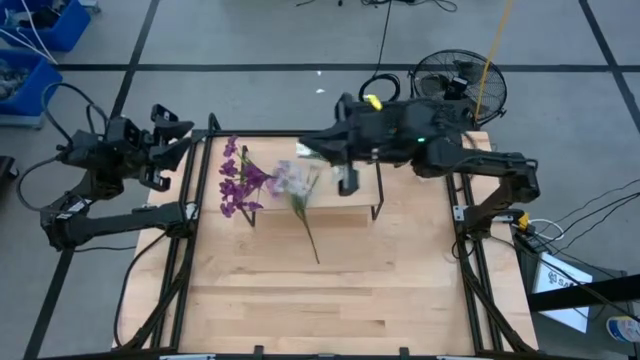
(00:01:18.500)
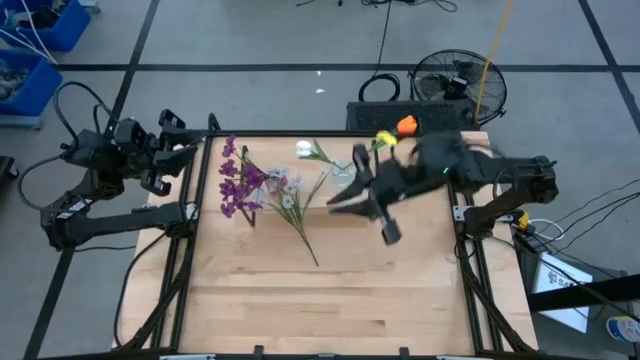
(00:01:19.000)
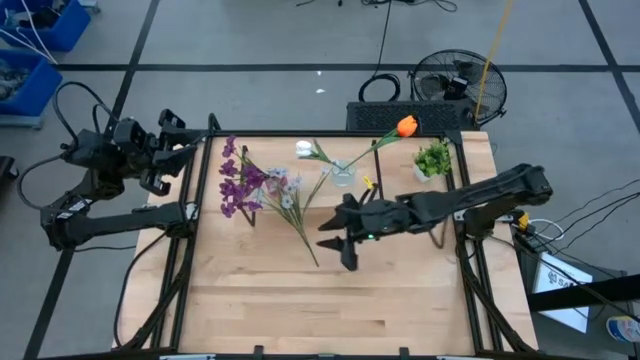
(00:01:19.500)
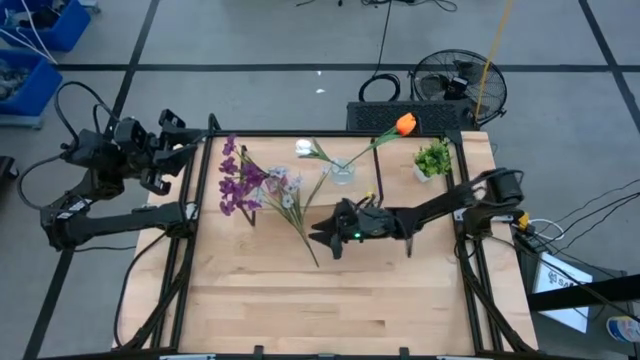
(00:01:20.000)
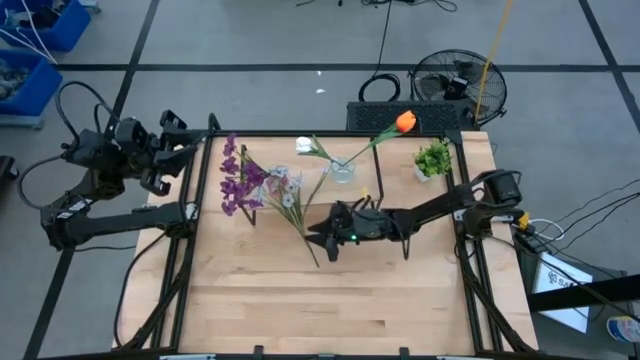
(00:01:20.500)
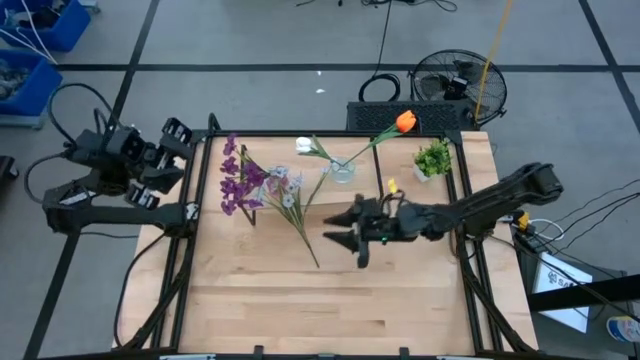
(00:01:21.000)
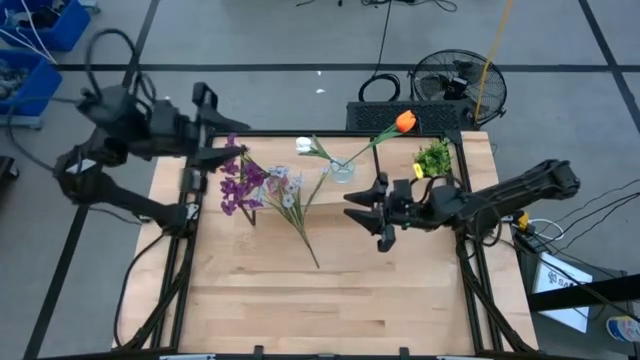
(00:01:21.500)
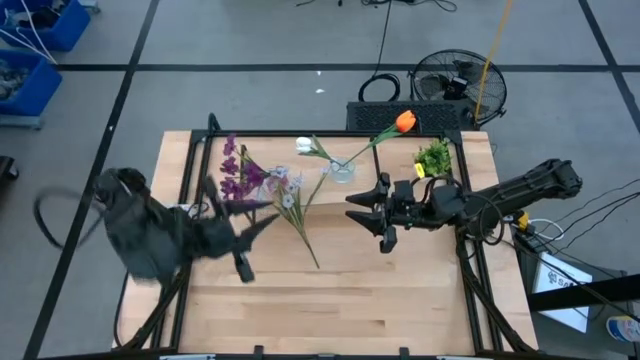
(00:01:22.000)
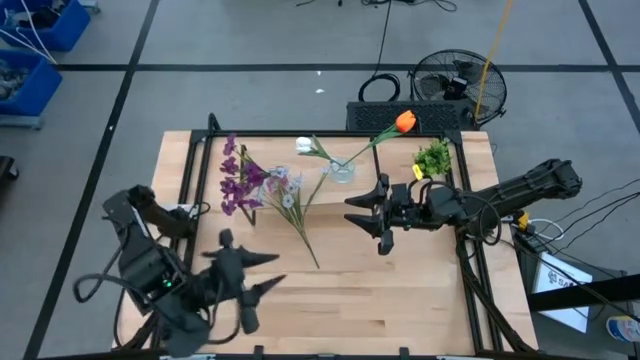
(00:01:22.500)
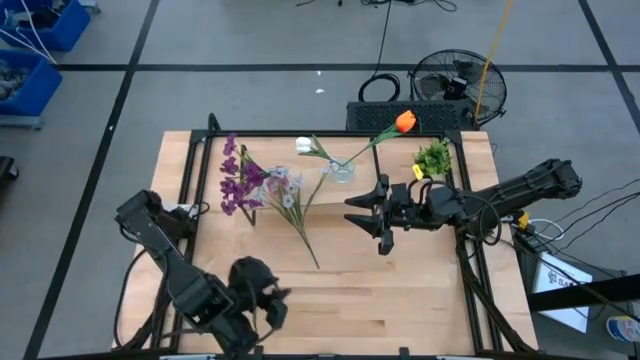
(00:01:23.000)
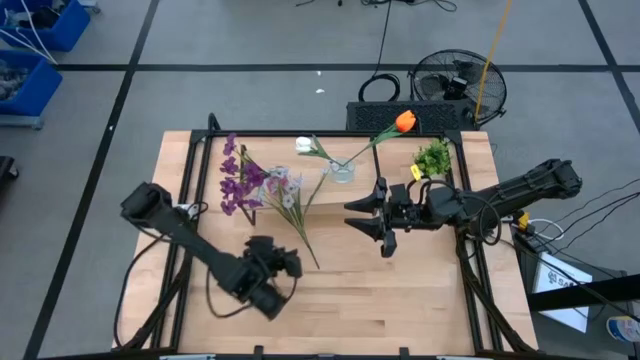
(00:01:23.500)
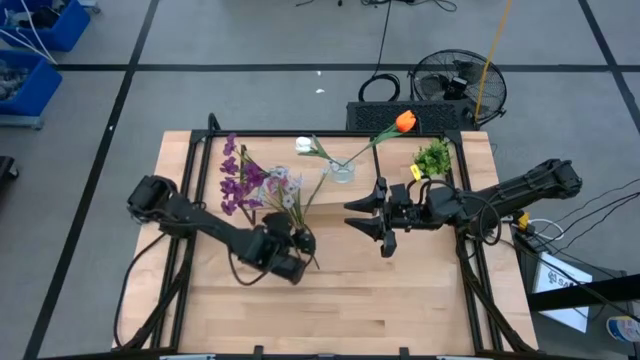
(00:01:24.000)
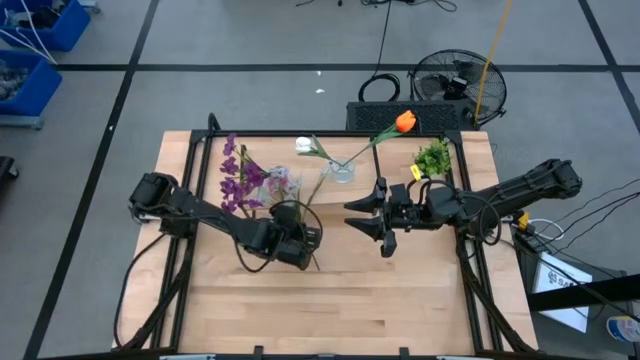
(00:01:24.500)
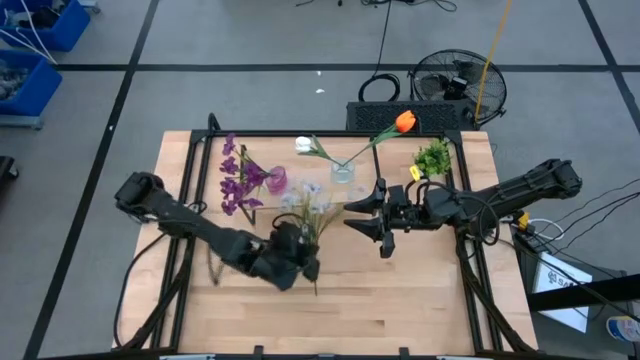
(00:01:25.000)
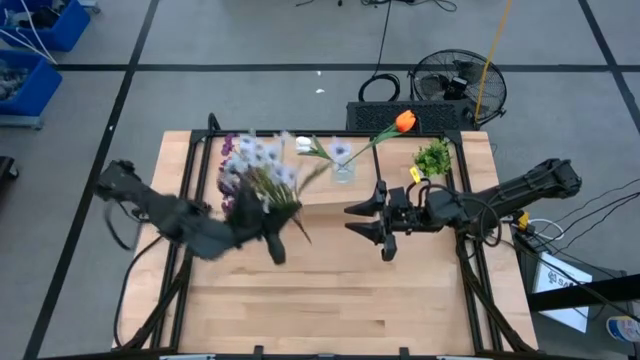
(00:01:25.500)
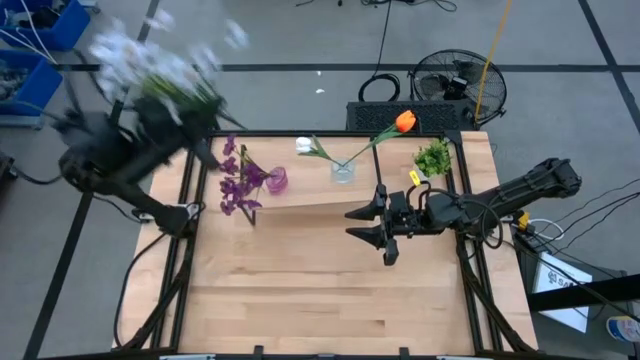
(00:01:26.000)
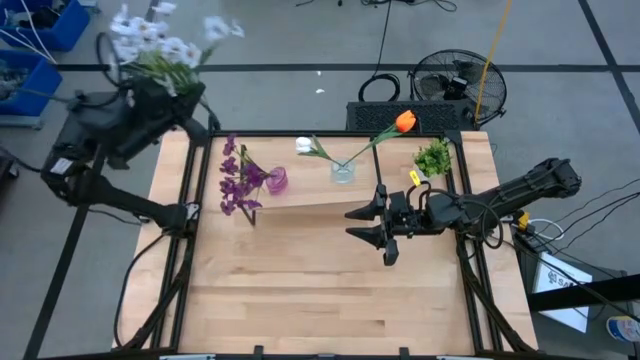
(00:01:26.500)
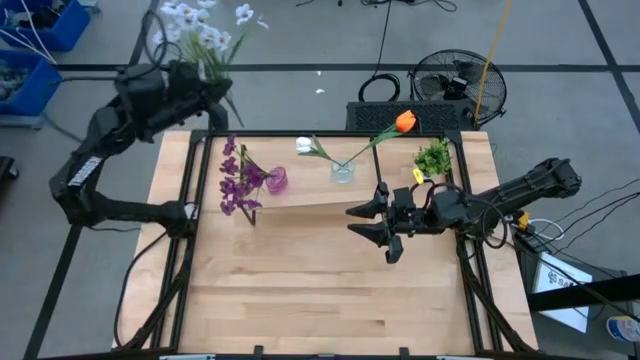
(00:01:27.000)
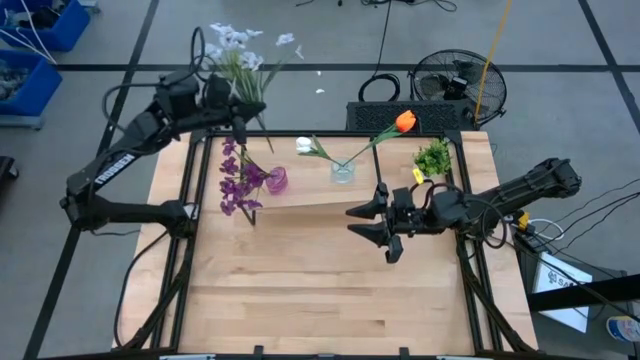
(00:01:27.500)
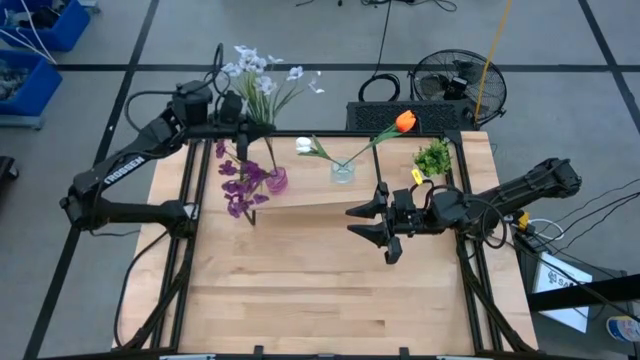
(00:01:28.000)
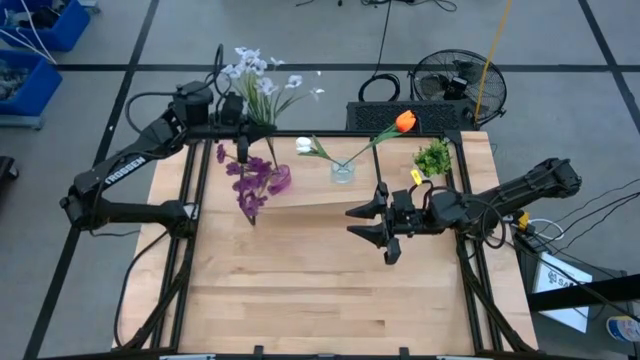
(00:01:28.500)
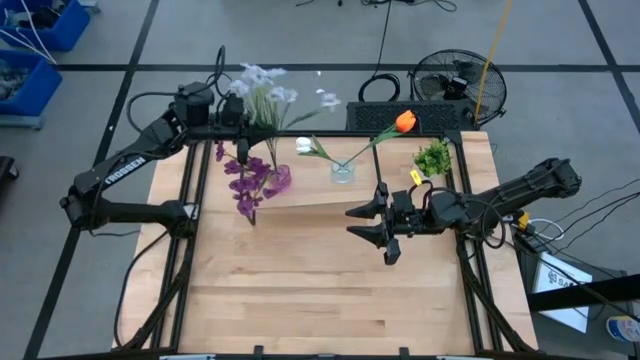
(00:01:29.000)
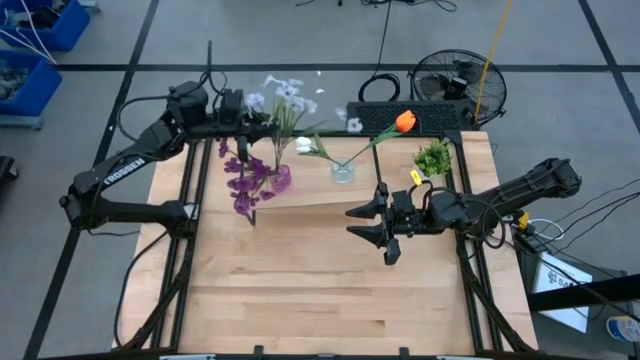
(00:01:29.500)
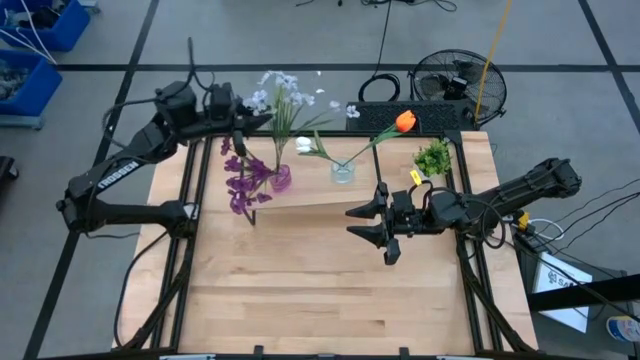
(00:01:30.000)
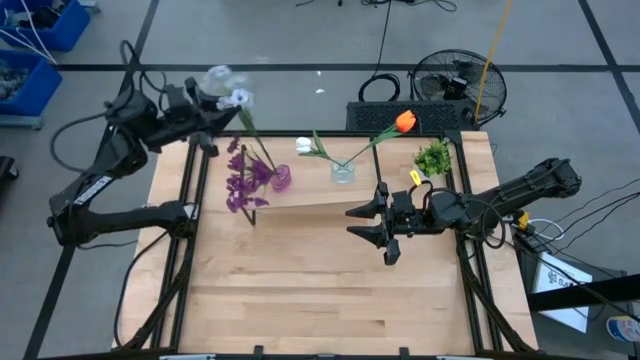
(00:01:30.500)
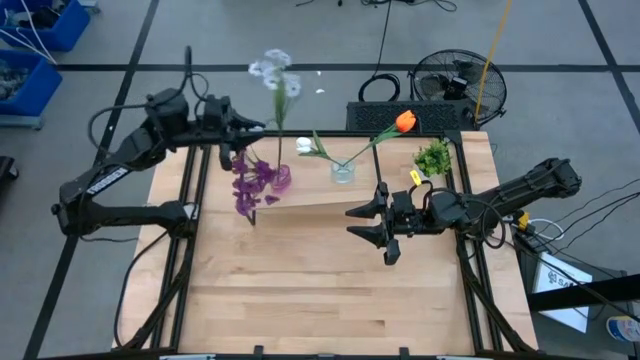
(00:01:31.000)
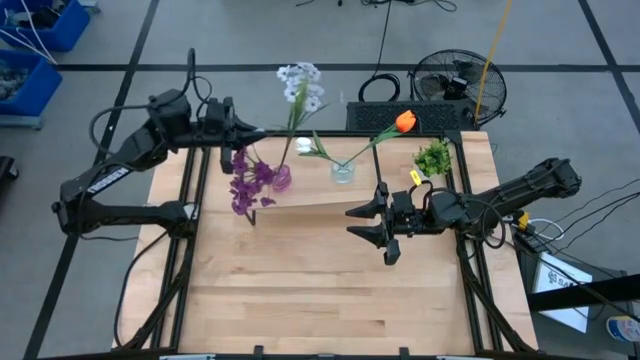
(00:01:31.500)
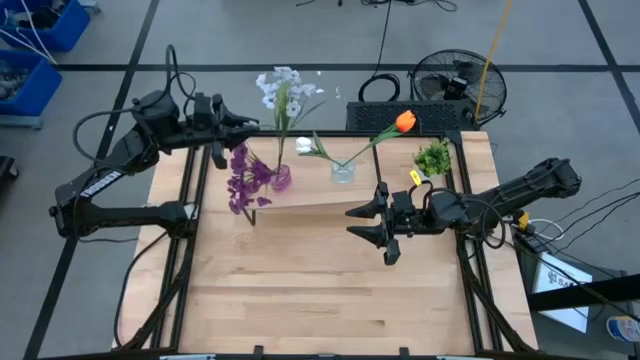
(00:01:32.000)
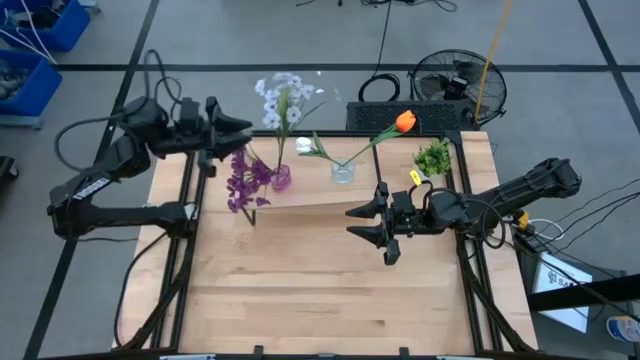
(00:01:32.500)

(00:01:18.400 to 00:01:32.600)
Task: Pick and place flowers into a vace then onto a shelf
Put the white flowers into the violet vase on the shelf

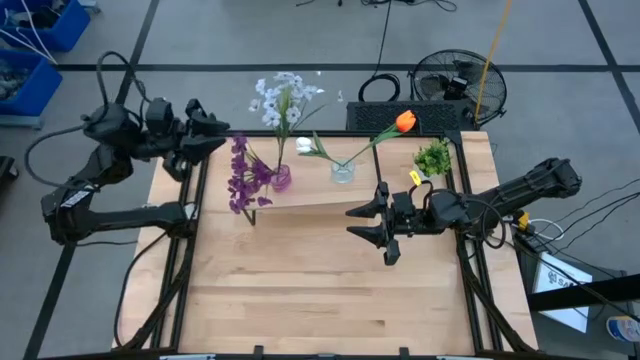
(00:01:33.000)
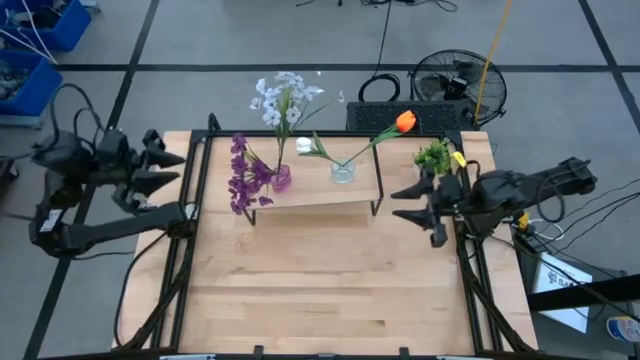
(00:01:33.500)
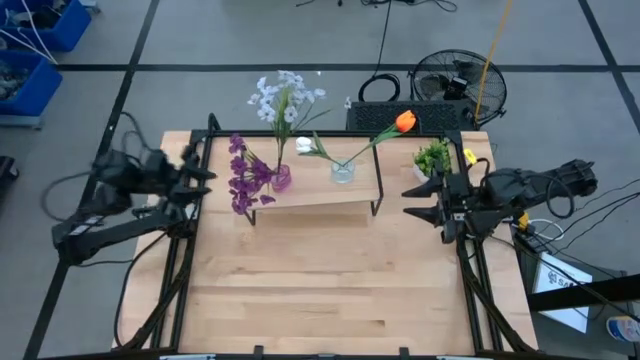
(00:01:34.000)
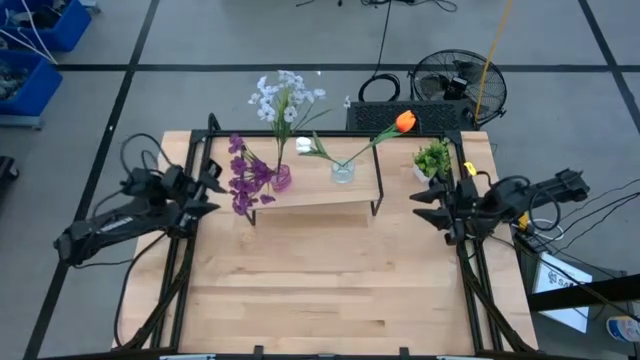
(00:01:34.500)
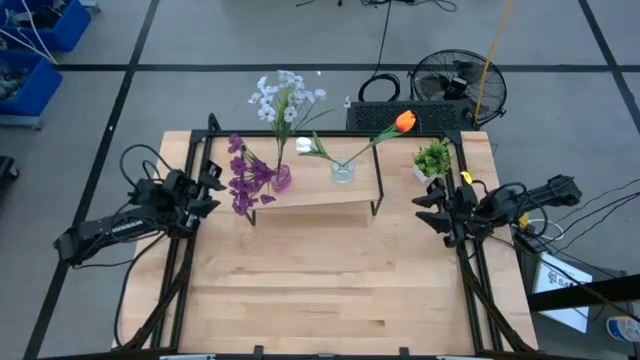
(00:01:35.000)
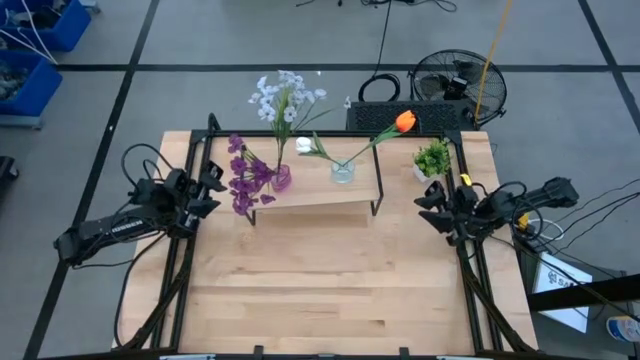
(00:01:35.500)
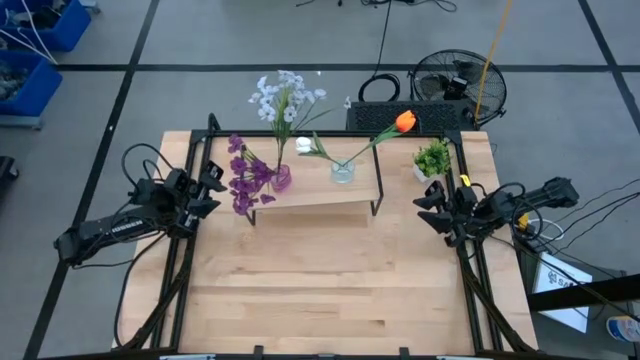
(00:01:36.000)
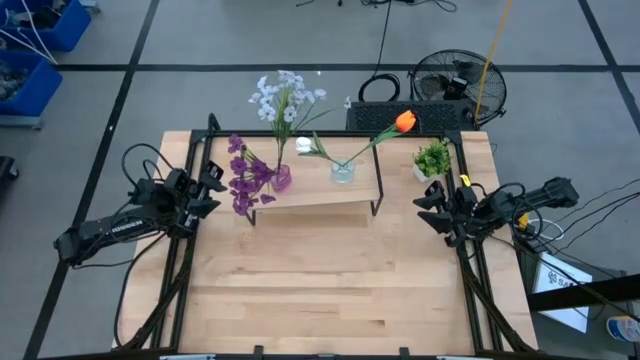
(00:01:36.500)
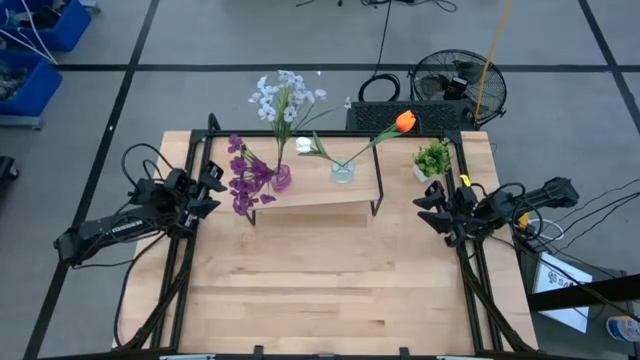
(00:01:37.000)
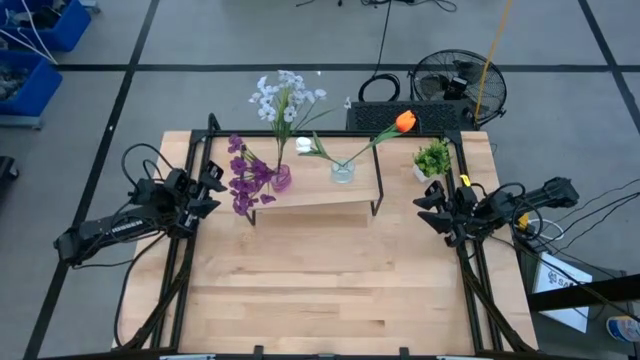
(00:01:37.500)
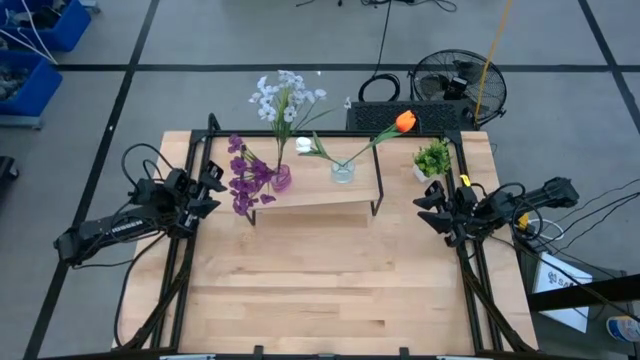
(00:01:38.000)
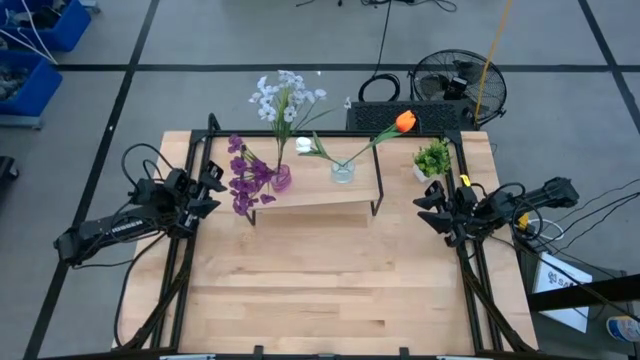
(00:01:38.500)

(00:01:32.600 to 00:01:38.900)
Return to Home Position
